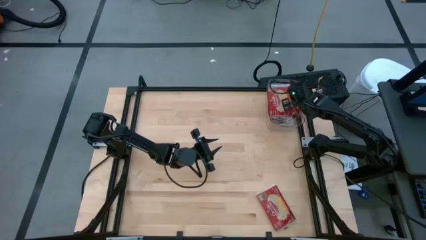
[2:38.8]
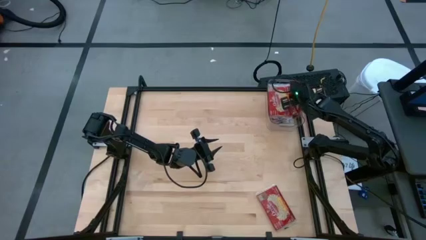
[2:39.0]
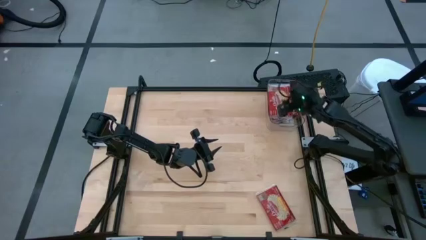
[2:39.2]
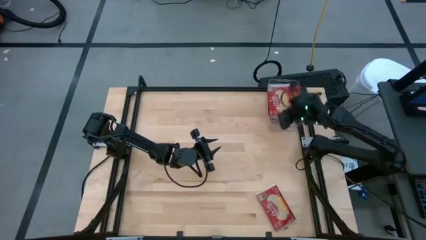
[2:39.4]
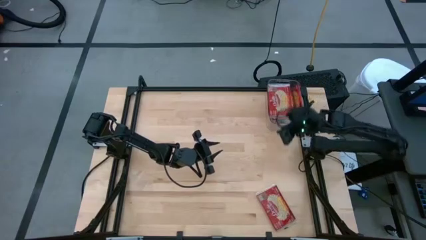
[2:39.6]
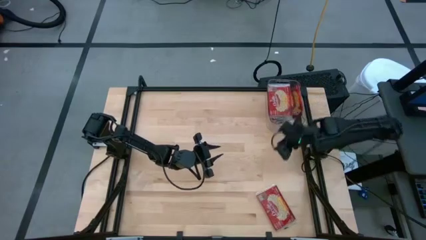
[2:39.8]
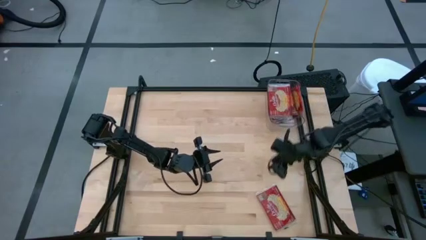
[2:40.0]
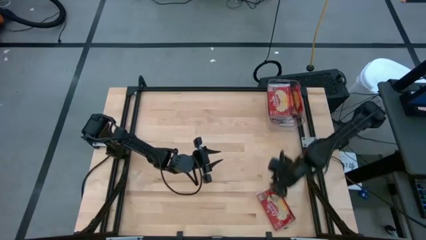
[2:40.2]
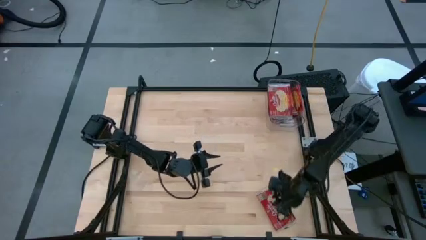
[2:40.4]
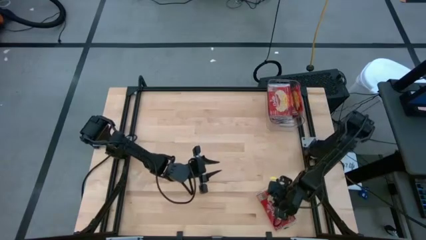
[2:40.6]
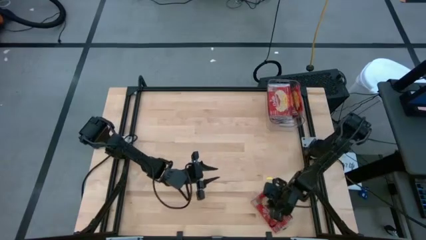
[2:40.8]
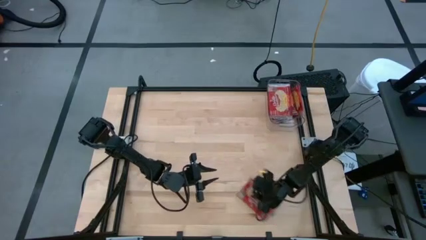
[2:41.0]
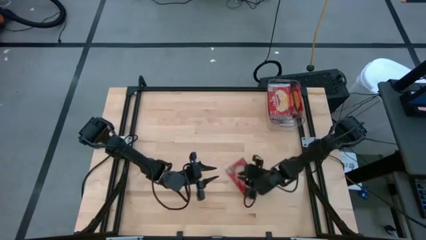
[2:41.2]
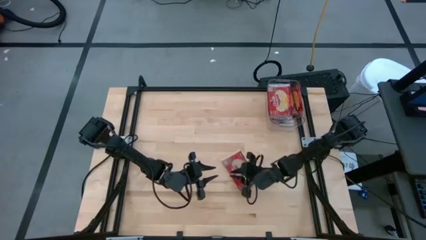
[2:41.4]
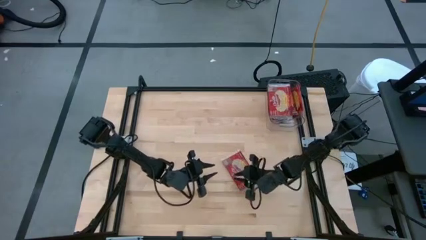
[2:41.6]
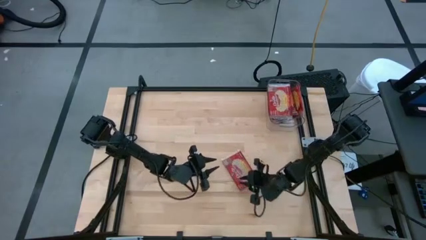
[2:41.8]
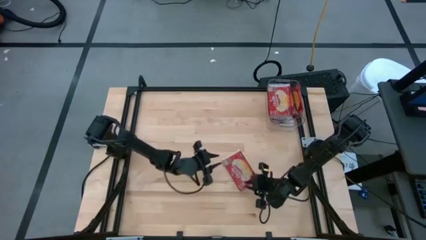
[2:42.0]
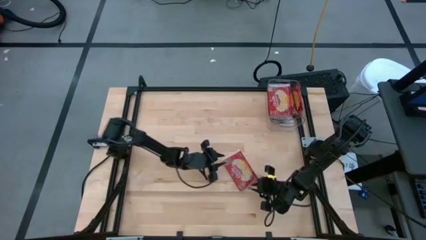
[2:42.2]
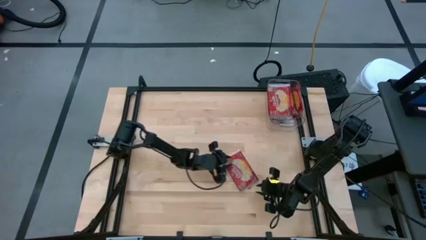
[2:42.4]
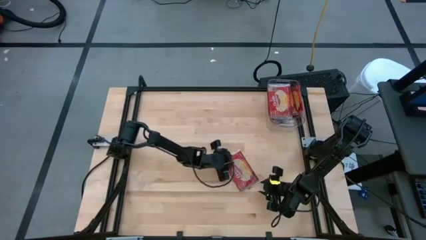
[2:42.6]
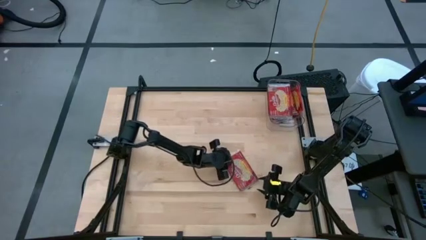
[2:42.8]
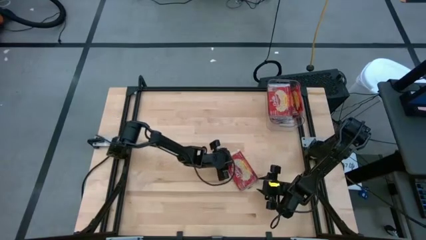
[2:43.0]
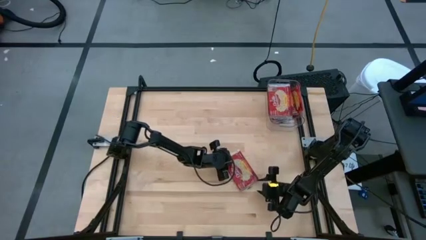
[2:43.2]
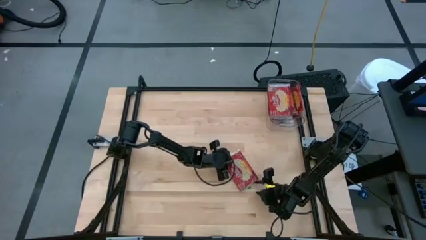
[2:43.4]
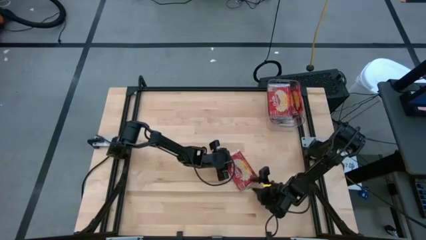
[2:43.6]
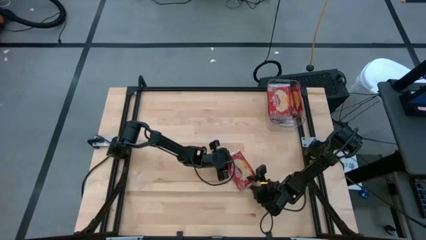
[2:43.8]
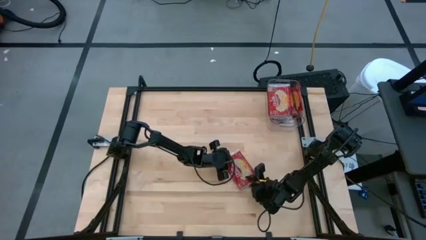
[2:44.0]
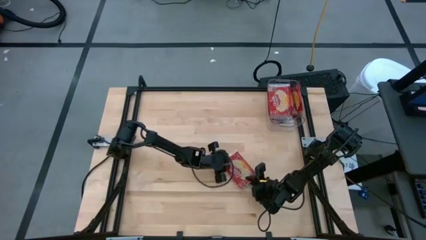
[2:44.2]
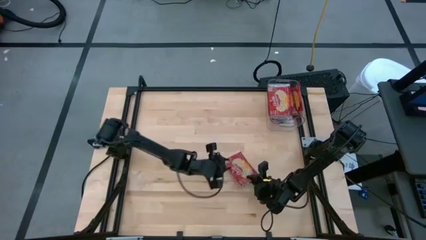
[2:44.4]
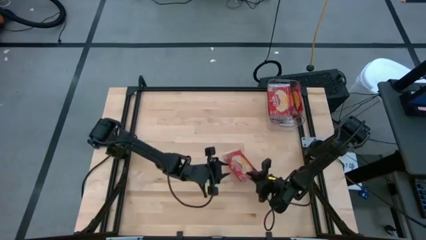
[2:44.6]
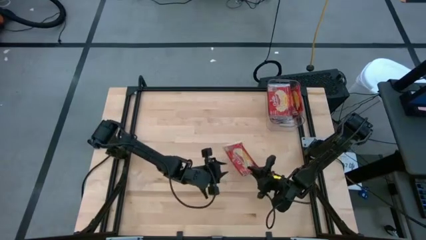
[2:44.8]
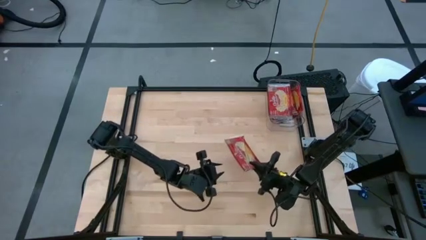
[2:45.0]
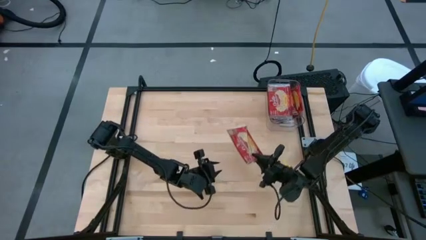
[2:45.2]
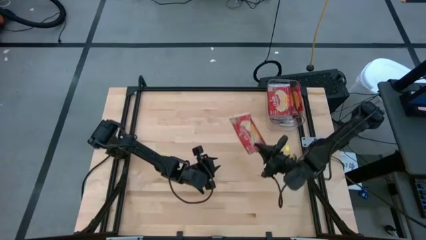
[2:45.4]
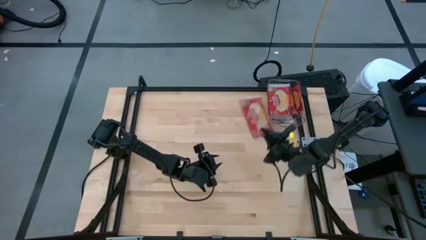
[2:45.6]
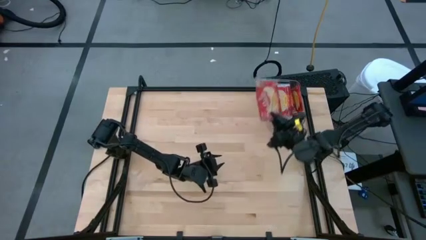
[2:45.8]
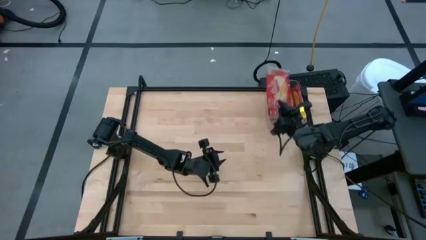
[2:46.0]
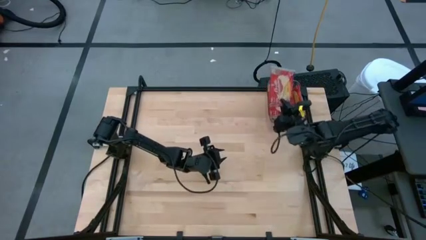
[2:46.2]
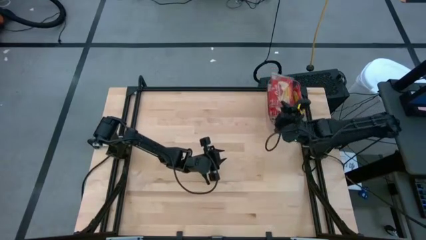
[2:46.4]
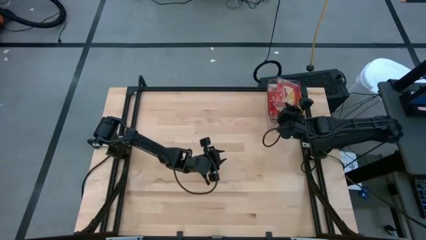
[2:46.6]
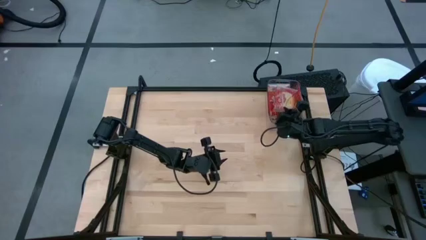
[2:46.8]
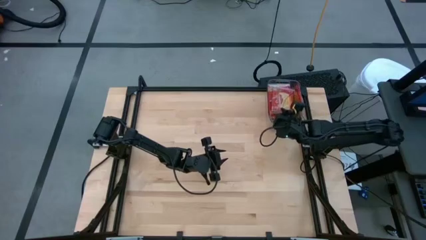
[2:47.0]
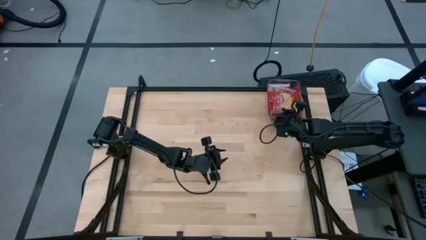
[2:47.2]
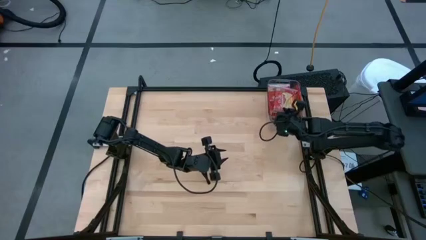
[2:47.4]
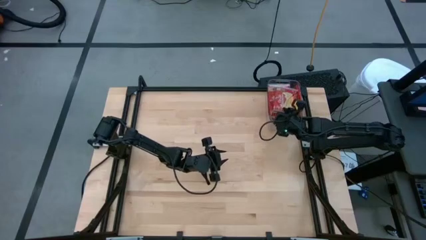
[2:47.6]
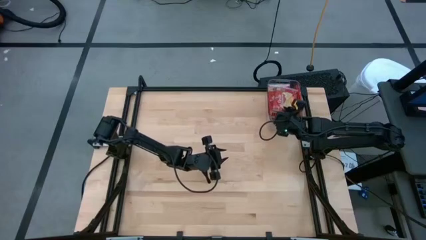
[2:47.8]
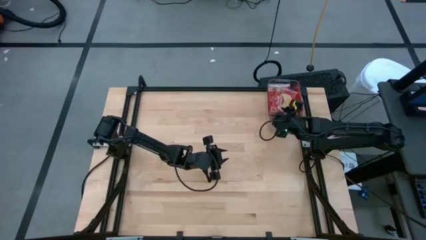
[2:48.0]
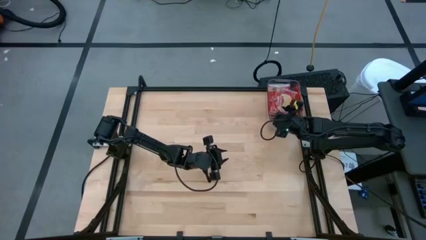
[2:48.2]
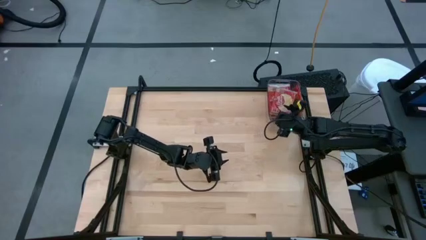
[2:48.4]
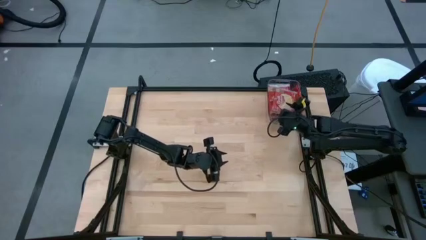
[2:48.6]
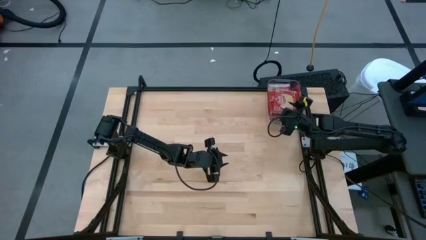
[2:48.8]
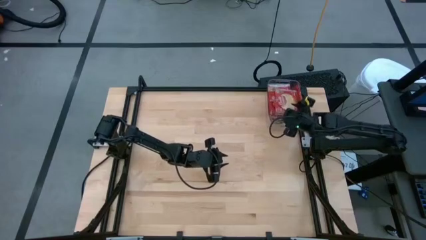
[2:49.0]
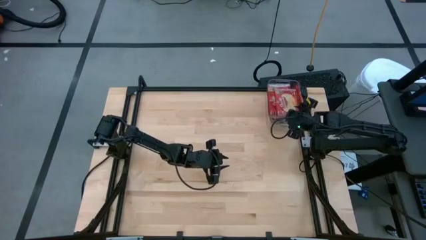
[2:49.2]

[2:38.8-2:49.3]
Task: Sort popcorn bags into baskets
Put the red popcorn bag into the transparent bin

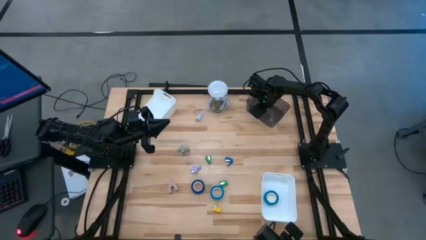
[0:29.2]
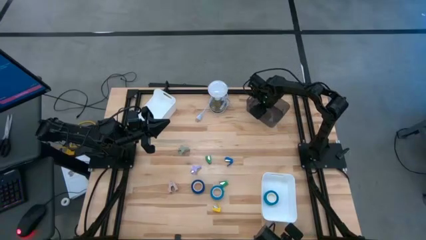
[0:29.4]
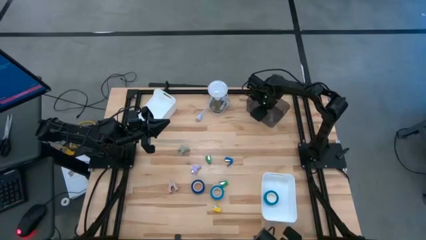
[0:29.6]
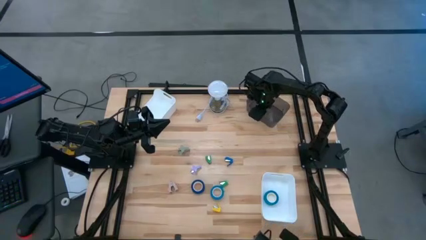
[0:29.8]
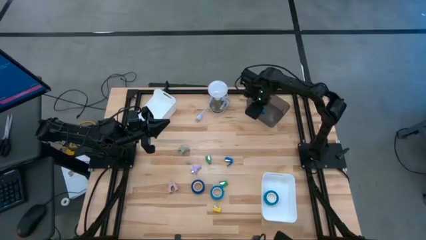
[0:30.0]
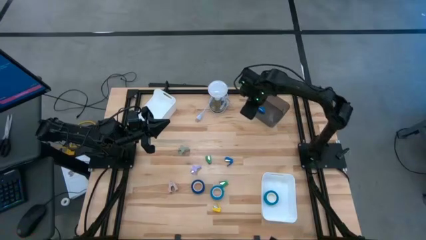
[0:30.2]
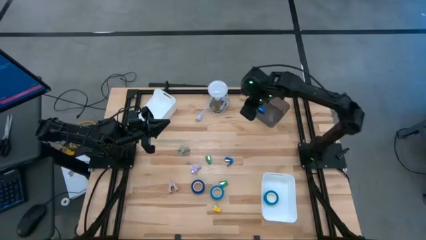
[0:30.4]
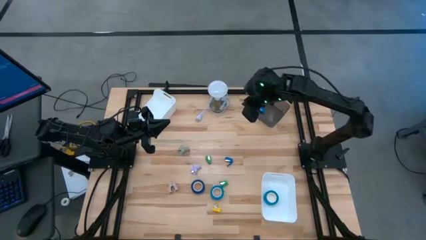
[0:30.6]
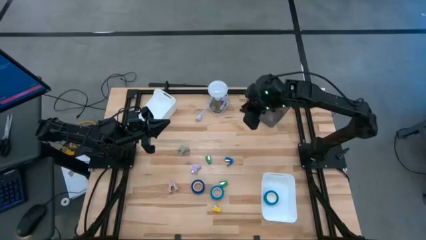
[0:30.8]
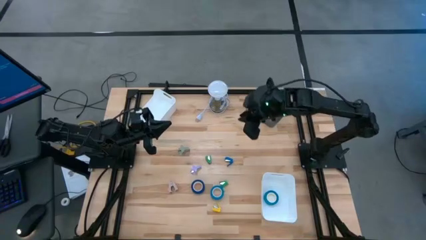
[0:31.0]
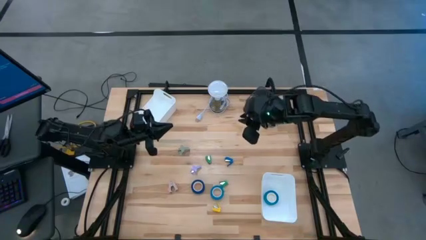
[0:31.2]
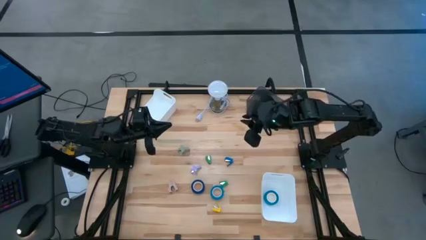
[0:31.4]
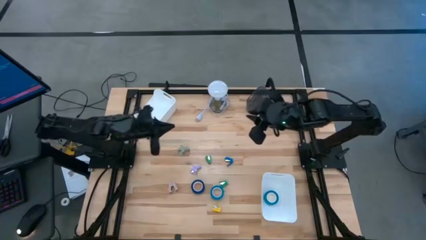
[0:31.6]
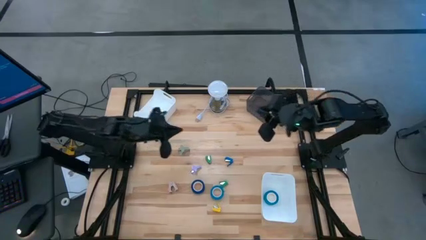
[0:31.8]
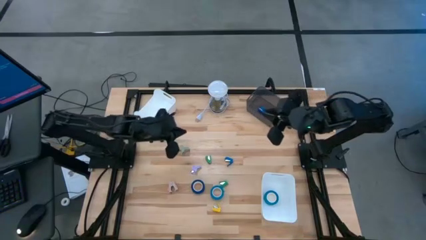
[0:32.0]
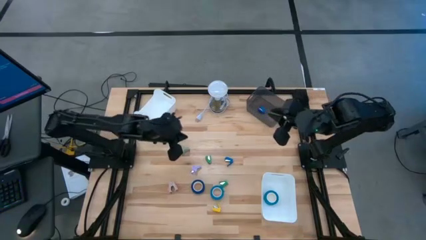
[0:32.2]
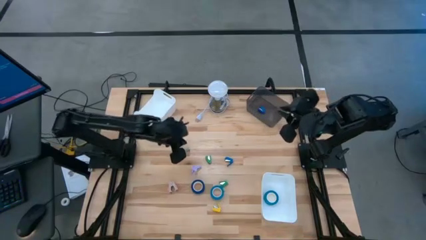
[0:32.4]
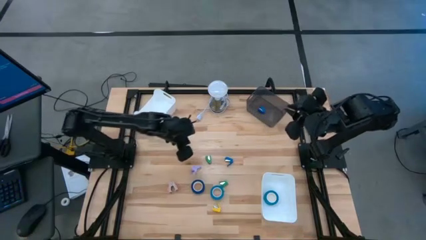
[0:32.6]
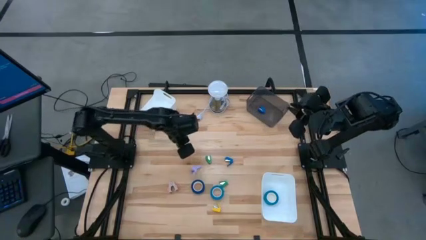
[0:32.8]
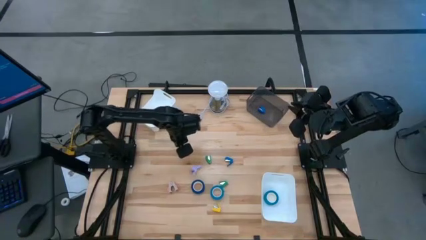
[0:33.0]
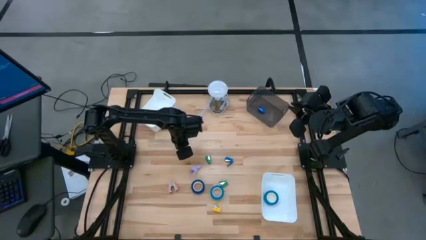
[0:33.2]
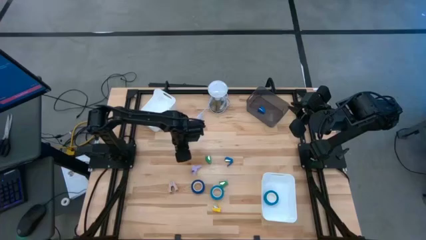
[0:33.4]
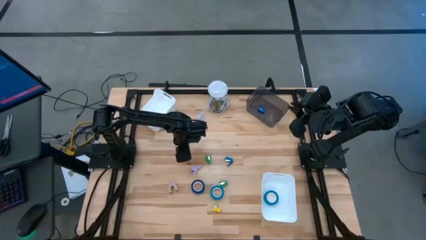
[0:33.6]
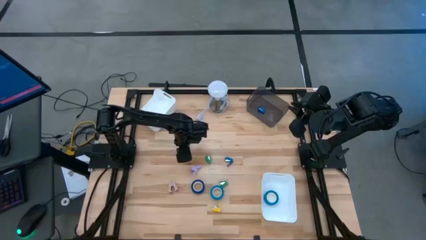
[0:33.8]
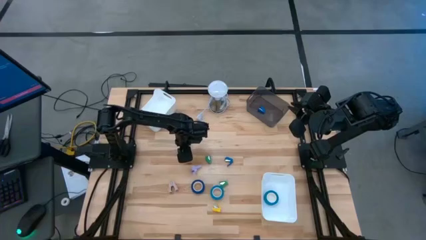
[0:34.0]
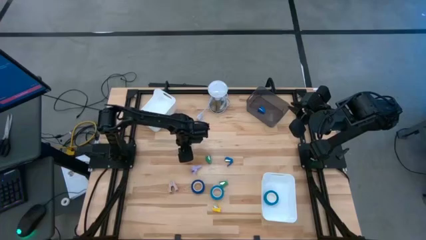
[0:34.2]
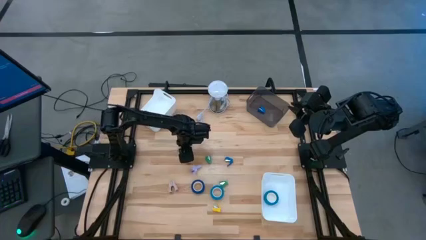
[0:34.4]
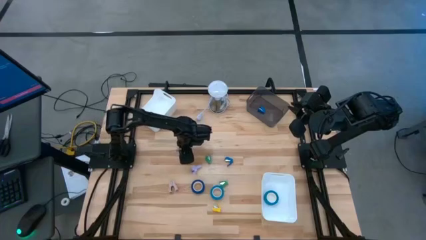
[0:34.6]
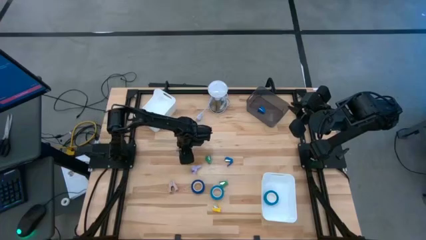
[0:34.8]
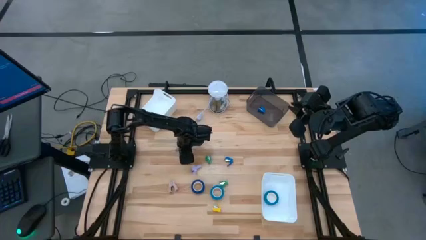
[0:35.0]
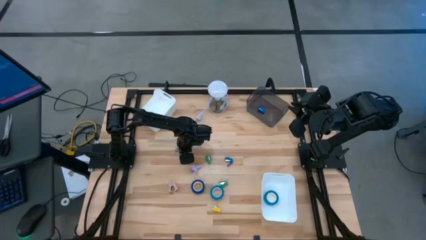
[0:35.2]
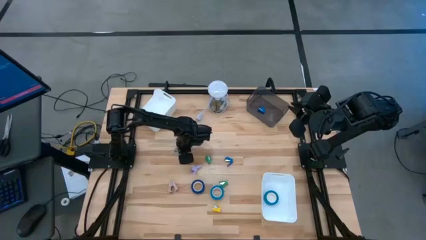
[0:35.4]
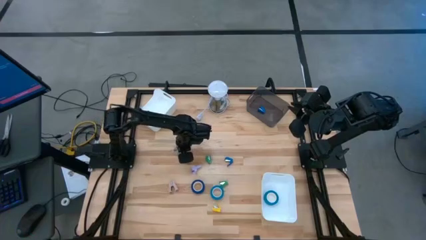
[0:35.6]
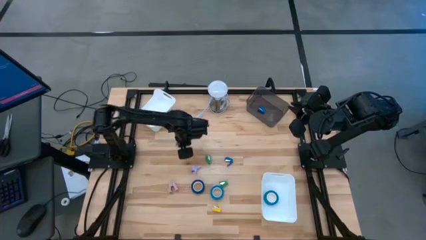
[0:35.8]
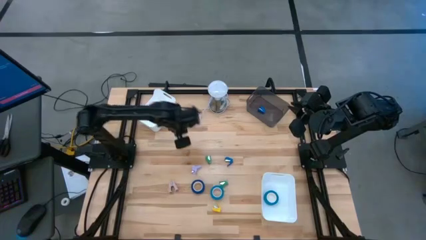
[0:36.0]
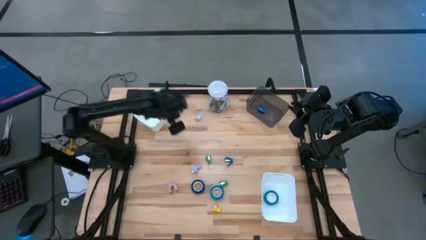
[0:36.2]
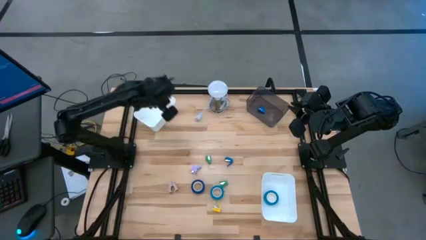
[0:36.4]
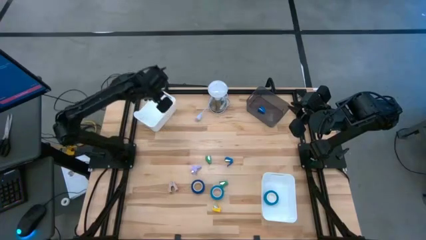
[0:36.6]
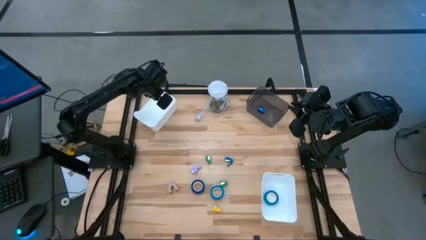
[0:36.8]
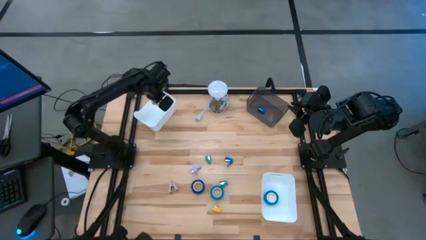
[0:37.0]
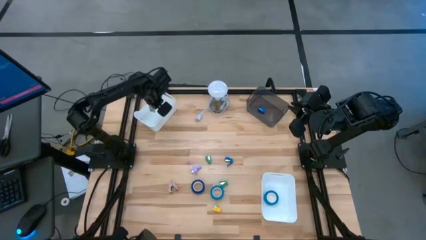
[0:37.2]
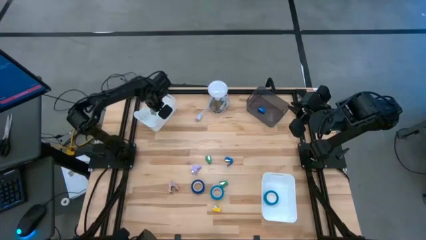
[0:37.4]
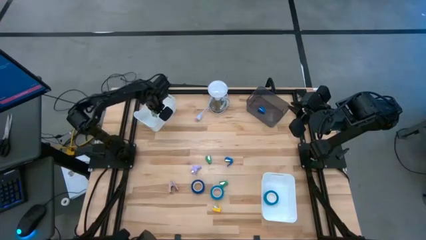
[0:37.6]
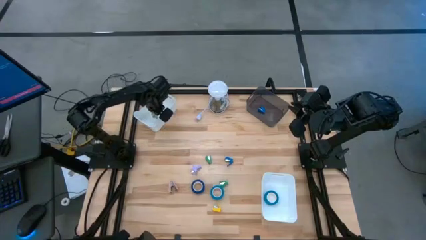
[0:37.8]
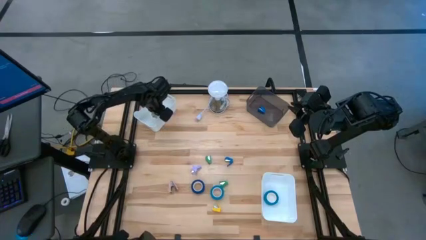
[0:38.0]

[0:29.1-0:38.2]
Task: Pick and place Stapler, Stapler remover, tape
Put the gray staple remover into the top white bin
